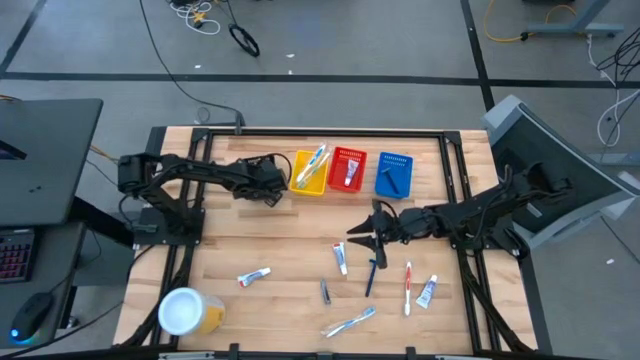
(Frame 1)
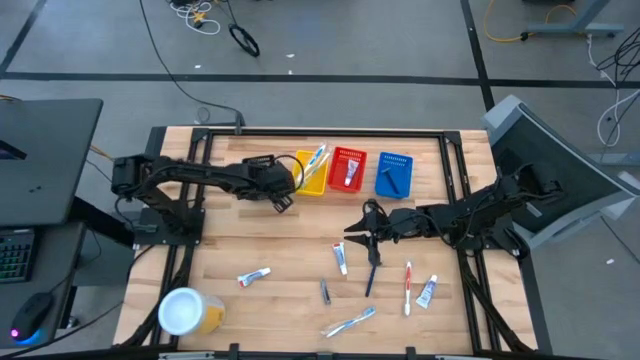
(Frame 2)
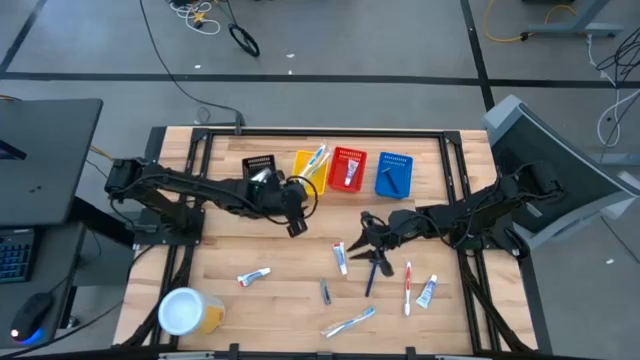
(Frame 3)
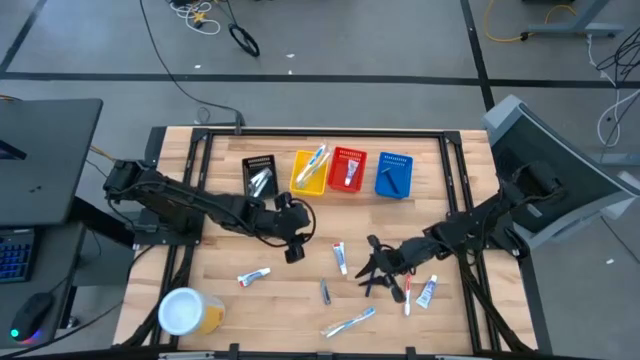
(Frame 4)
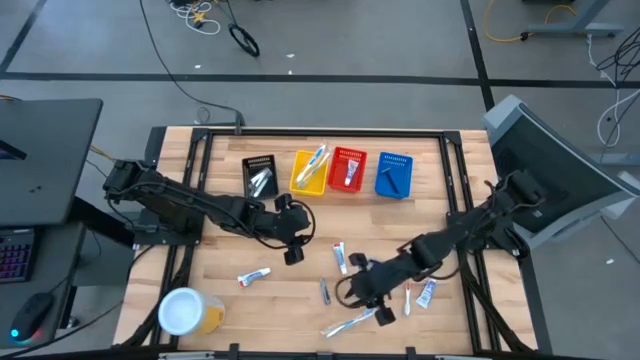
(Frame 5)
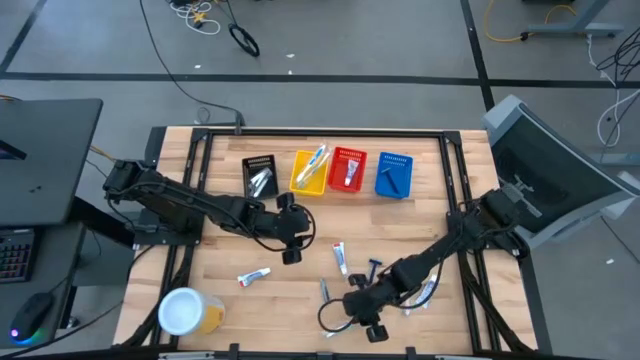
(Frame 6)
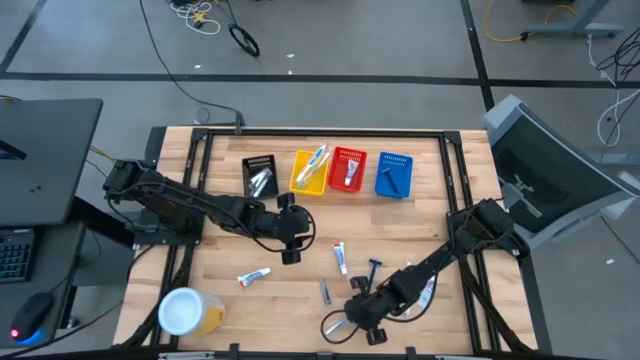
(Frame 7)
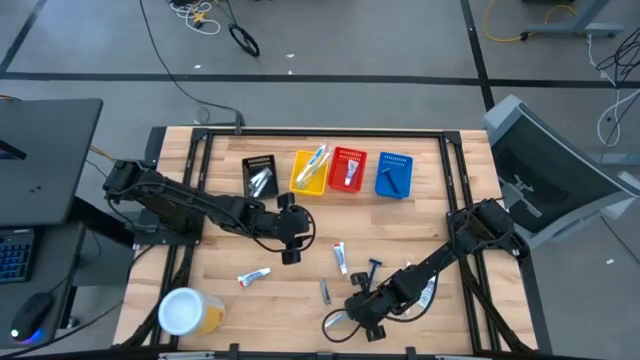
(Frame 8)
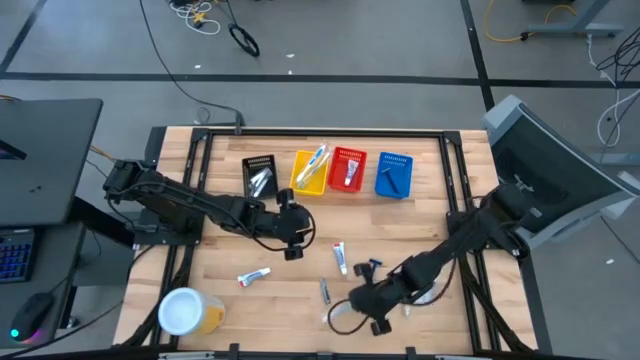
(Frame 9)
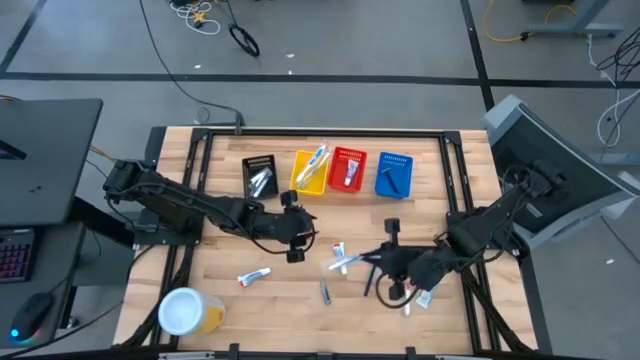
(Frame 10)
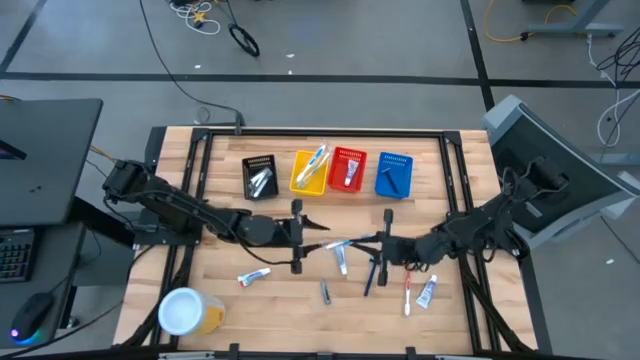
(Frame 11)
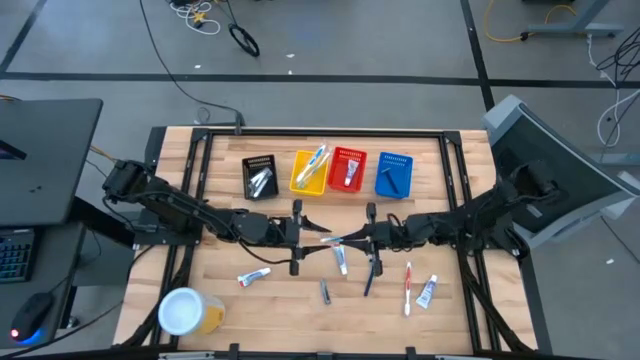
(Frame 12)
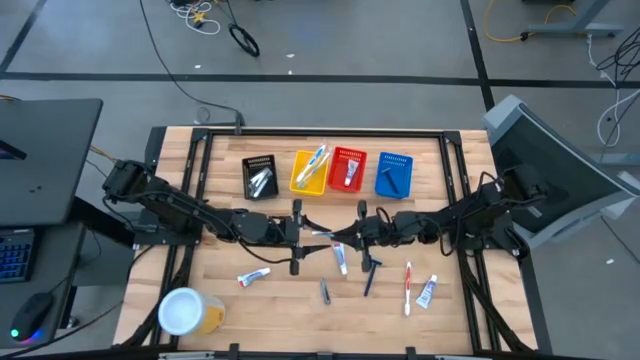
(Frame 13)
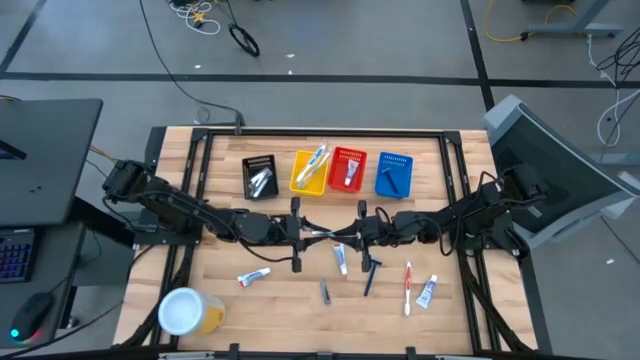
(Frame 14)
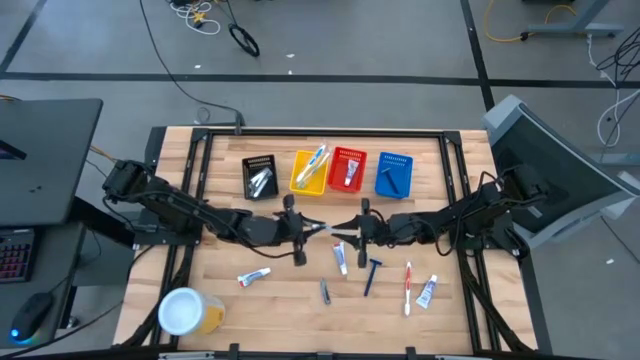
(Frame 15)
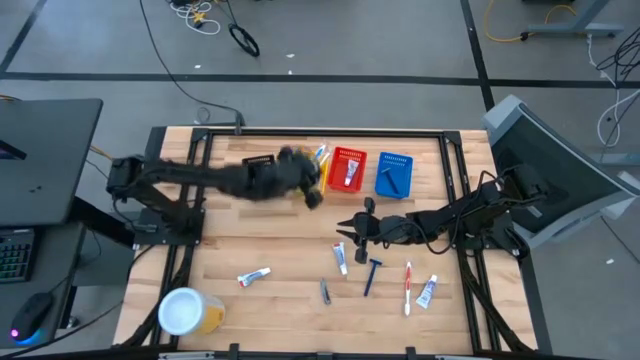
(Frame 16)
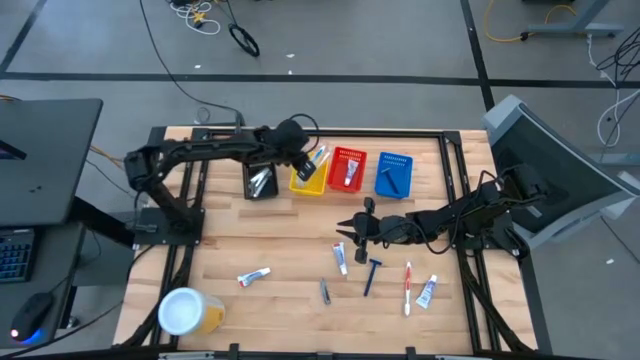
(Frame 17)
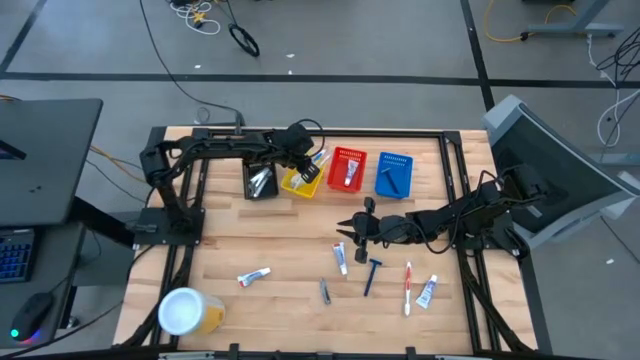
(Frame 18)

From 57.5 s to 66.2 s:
Task: Pick & Place Travel size toiletries
Put the blue toothbrush into the yellow bin

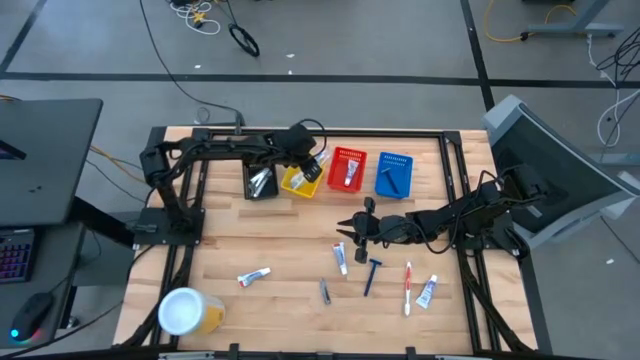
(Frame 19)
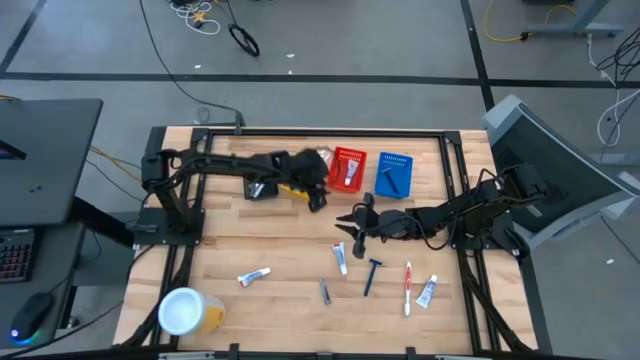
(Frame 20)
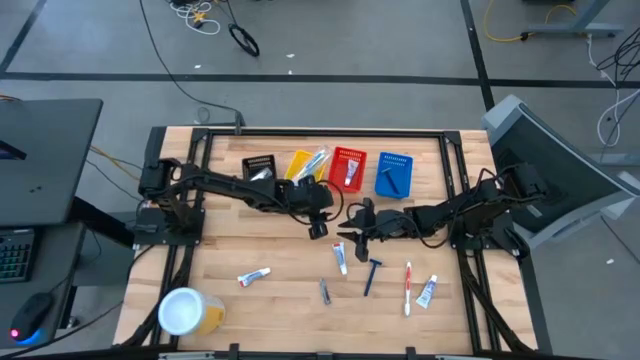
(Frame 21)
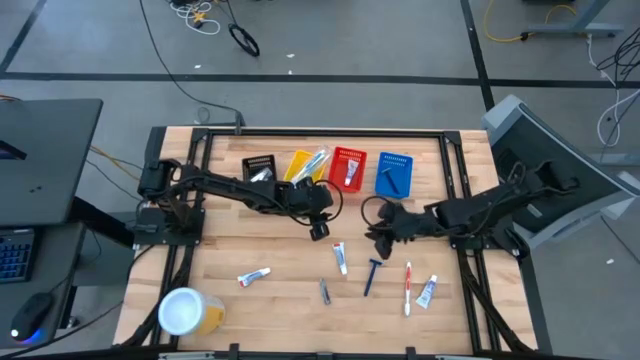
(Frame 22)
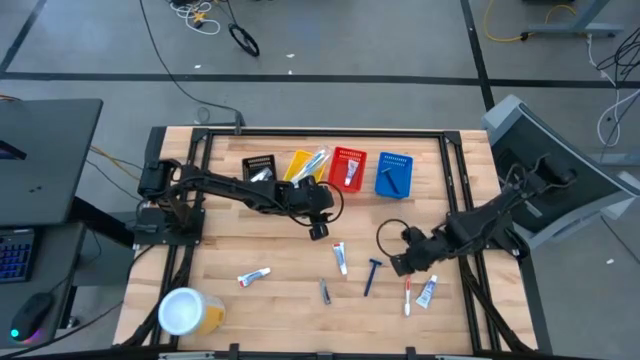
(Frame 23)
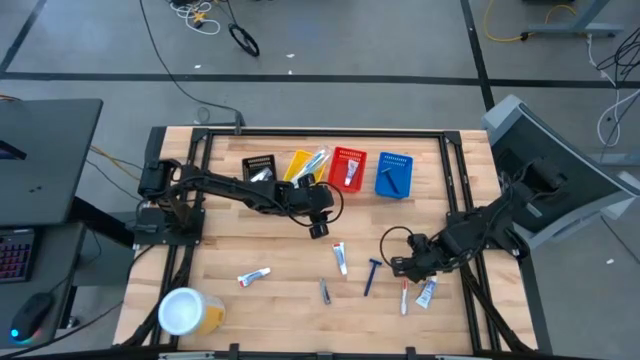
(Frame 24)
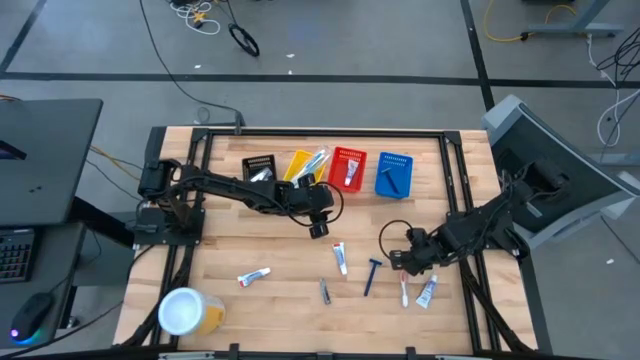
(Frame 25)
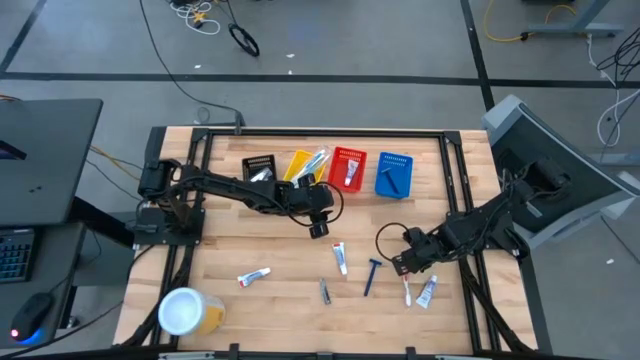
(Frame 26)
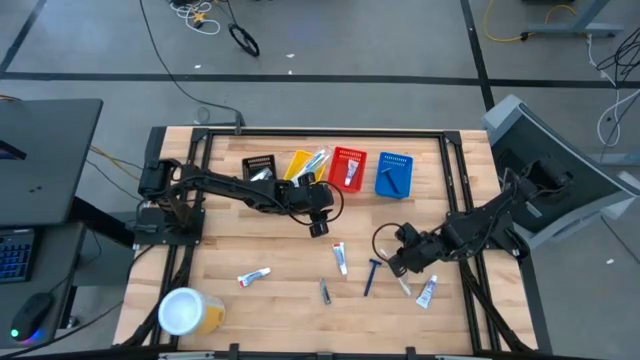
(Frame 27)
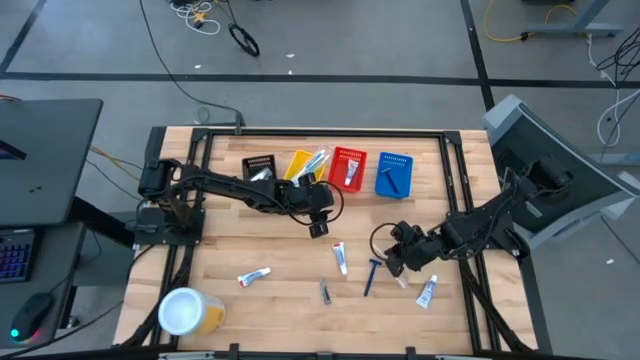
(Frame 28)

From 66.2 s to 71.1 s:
Put the orange toothbrush into the yellow bin

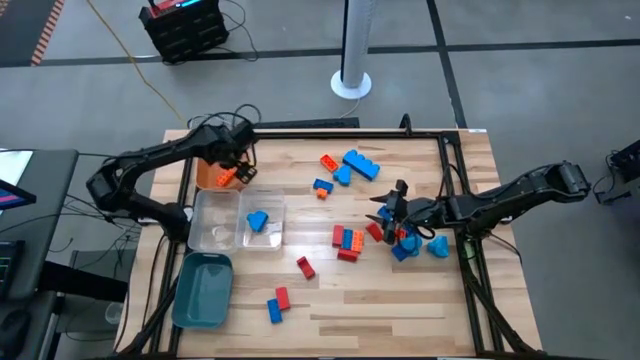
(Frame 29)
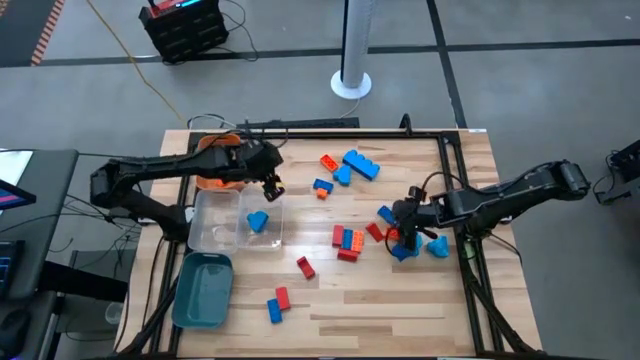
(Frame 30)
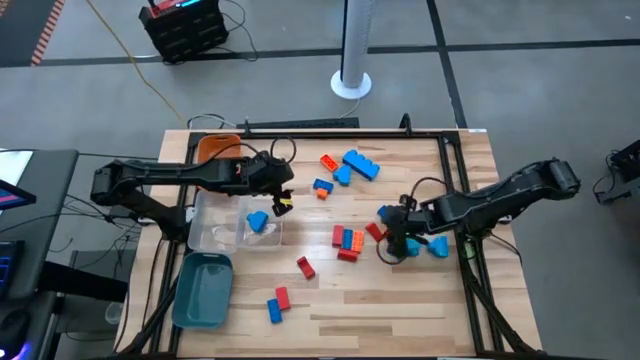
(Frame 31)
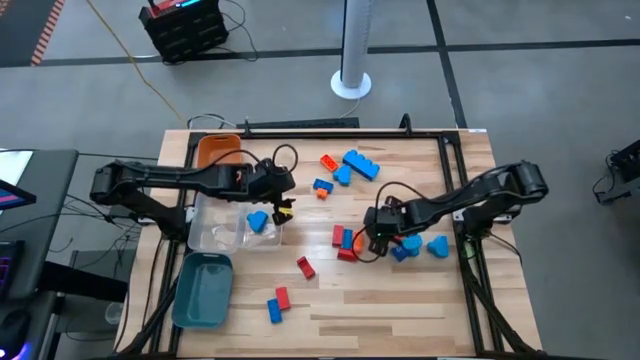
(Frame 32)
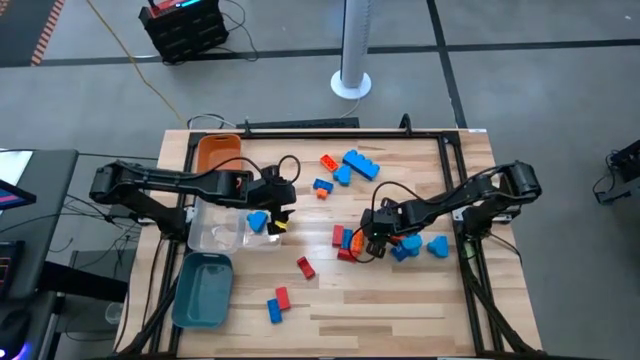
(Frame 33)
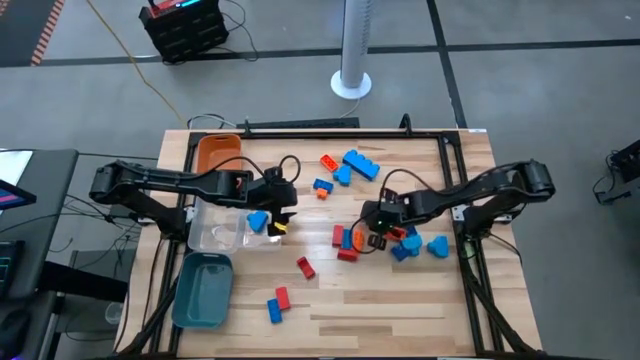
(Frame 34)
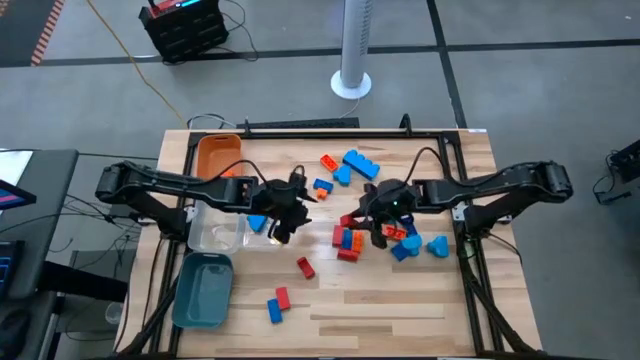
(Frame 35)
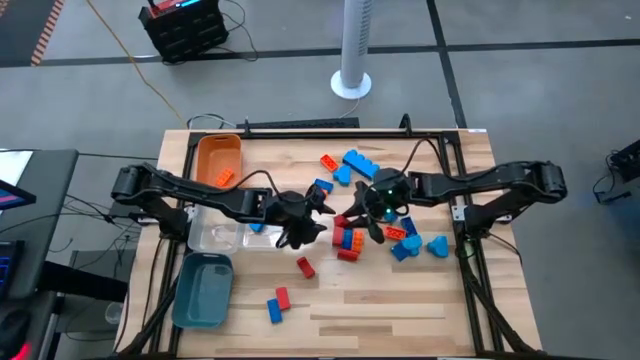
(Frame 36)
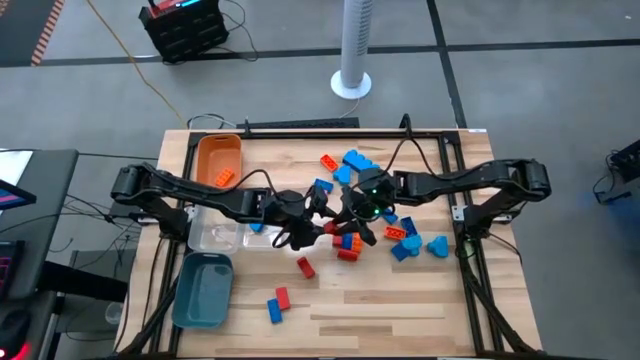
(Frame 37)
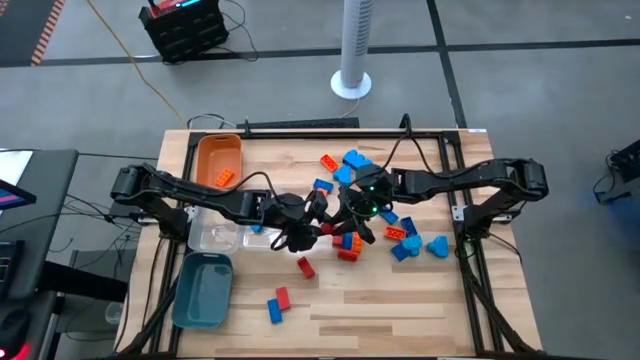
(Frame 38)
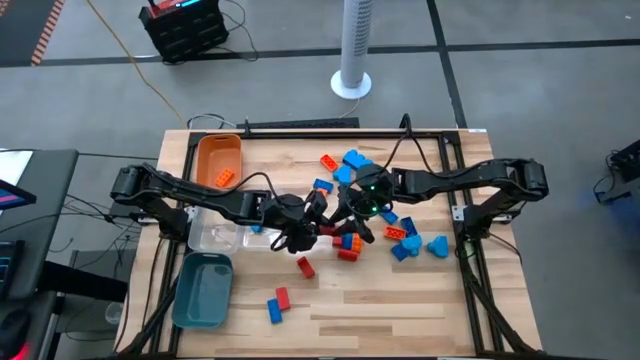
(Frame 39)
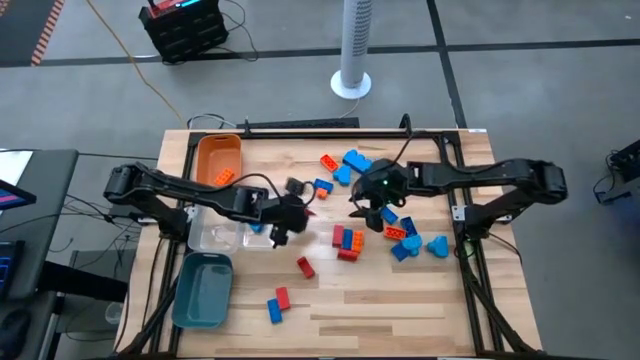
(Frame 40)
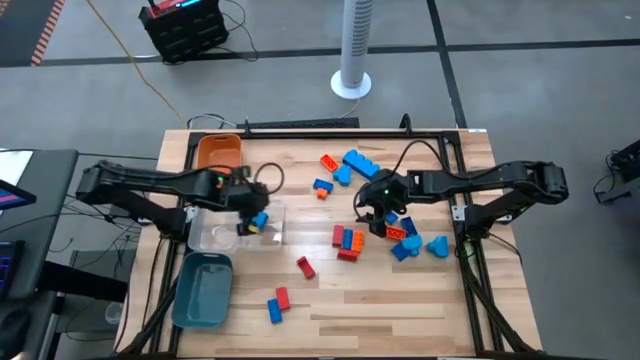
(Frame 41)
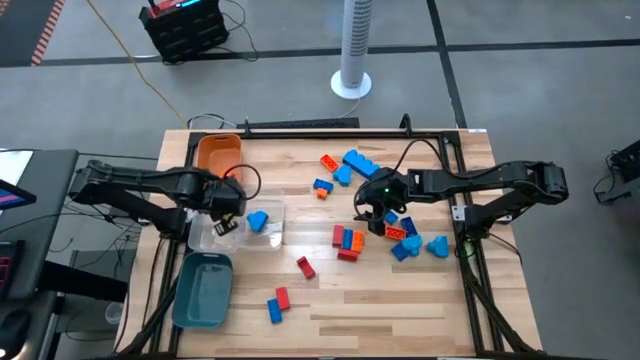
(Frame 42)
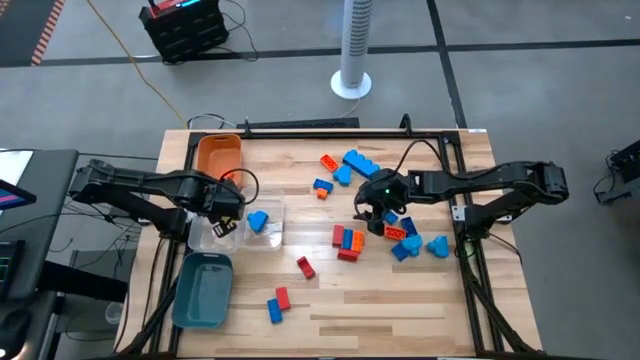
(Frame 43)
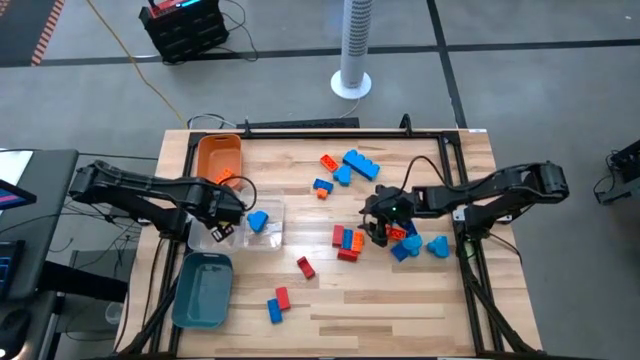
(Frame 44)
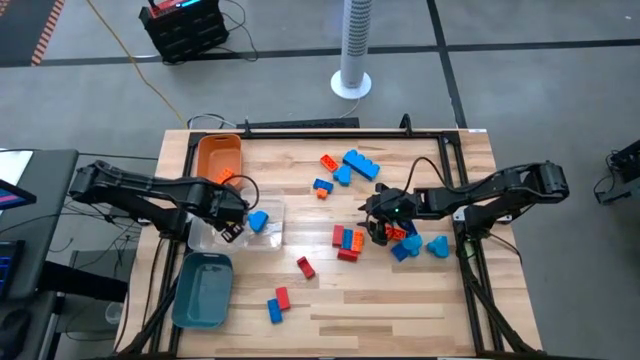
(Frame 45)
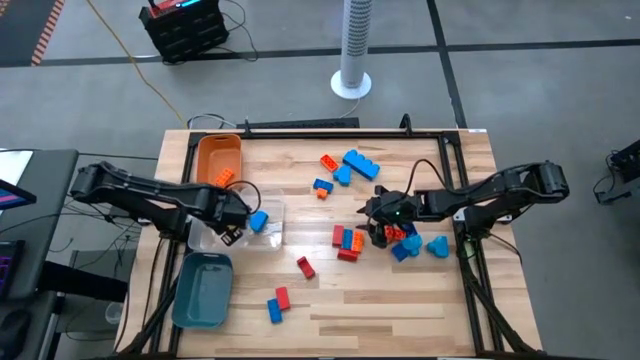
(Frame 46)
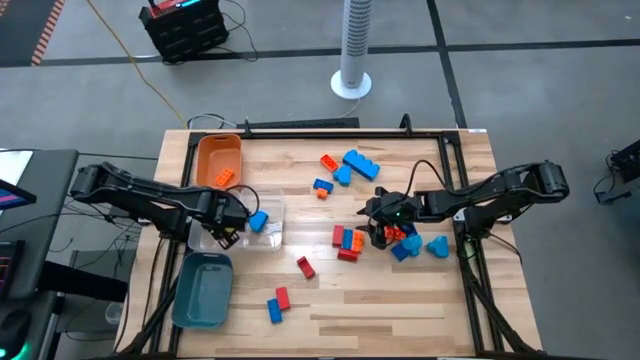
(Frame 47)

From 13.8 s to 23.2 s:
Task: Sort blocks
Put the red block into the left transparent bin
